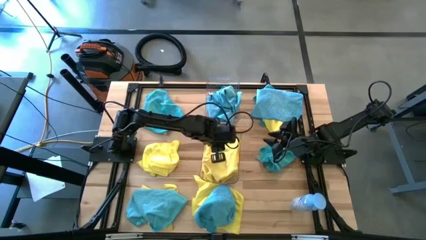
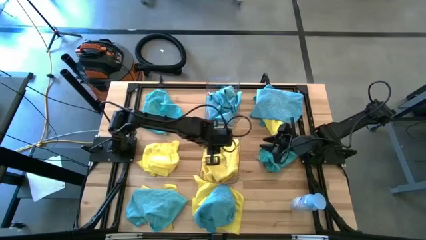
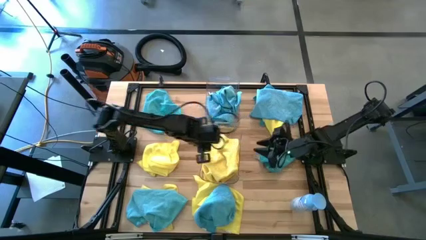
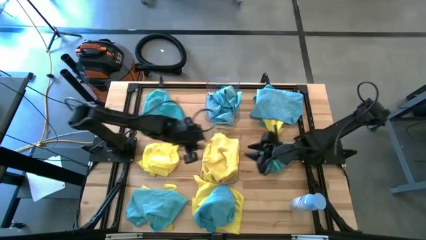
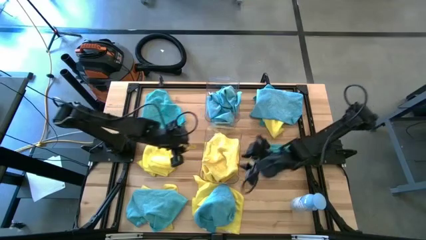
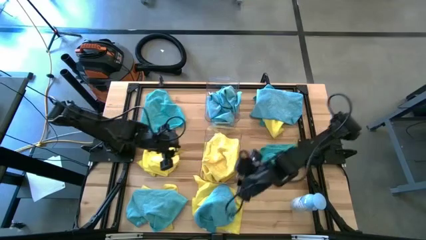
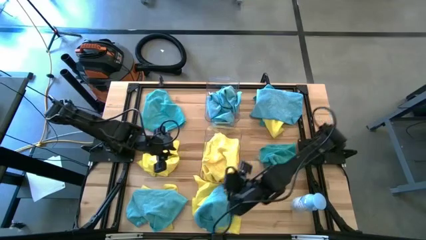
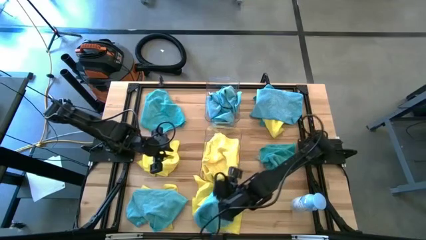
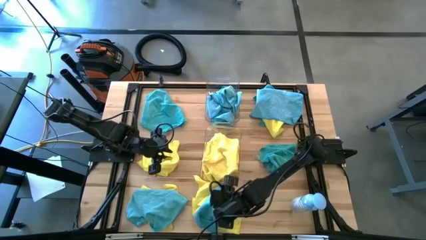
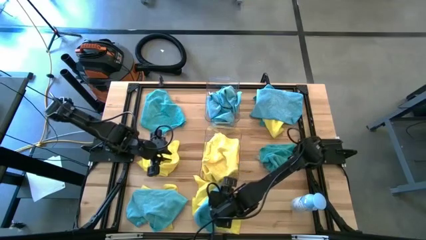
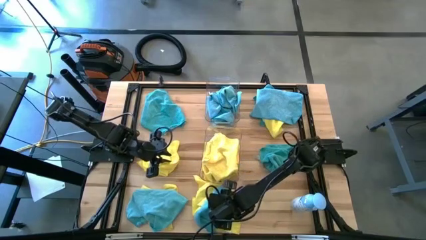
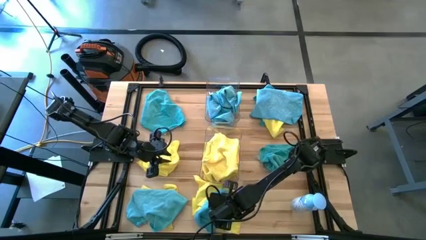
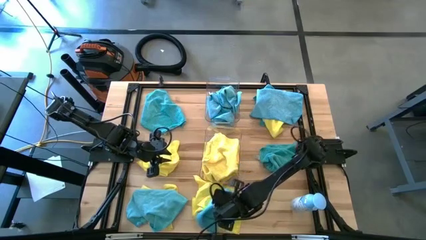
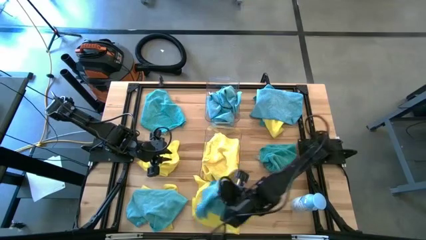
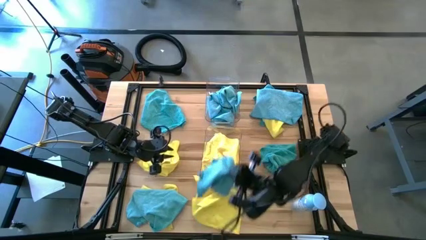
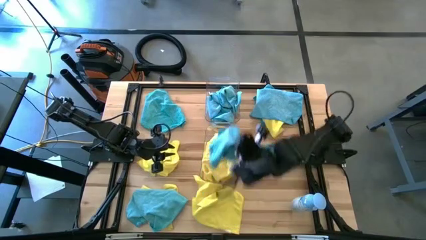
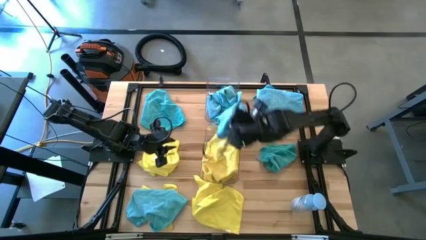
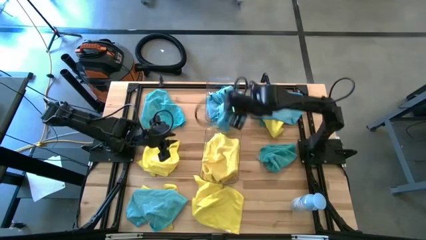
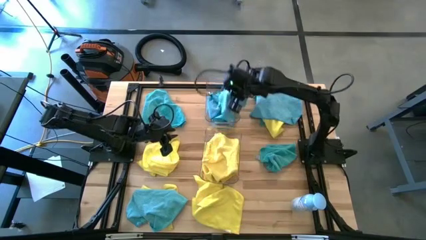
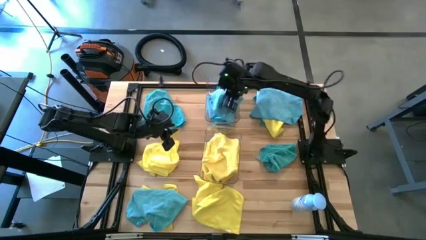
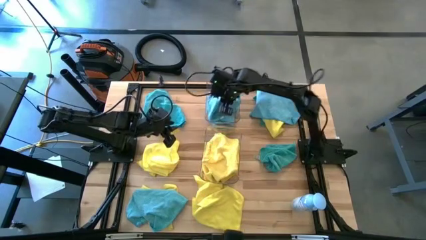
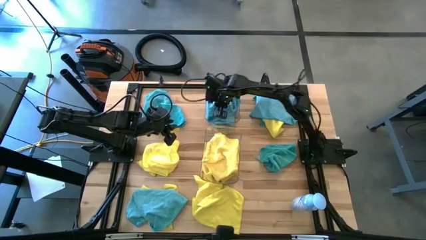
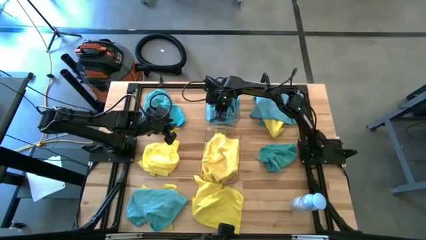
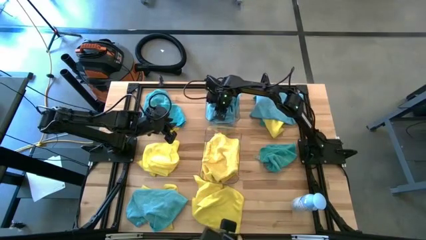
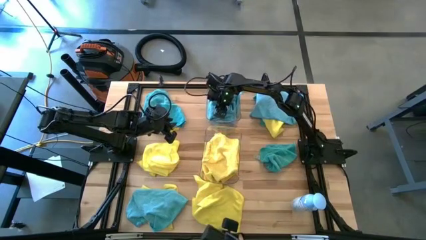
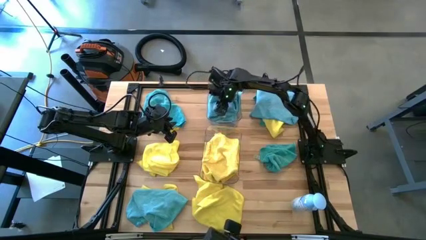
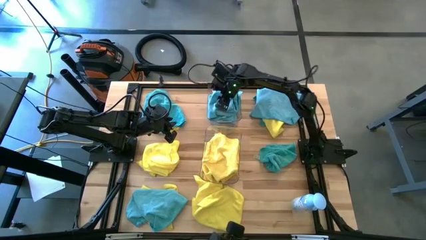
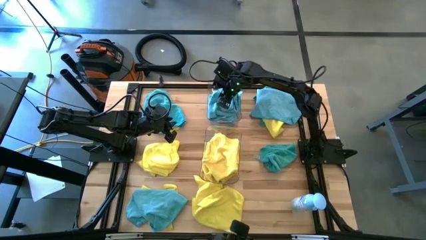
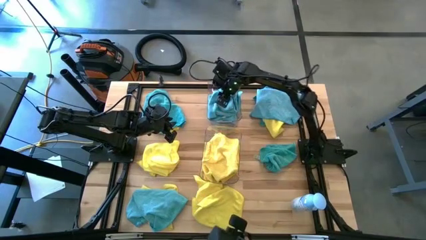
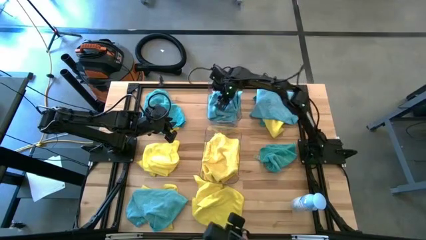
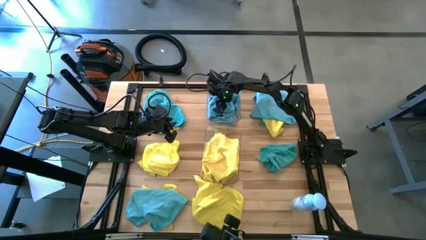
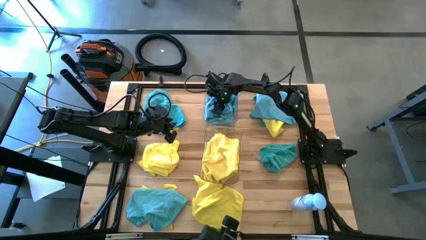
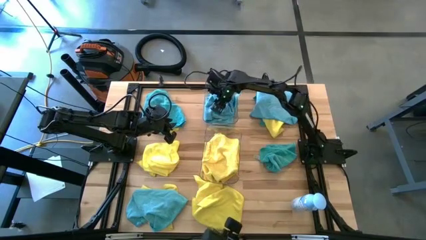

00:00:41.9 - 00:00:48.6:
Task: Sort microfiber towel by color & place in baskets
Put the blue towel into the top transparent bin

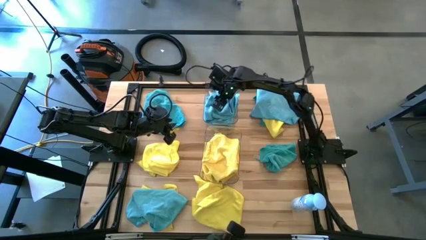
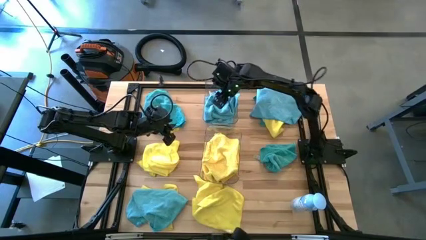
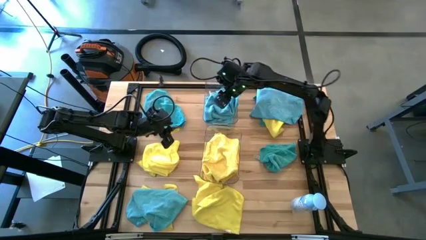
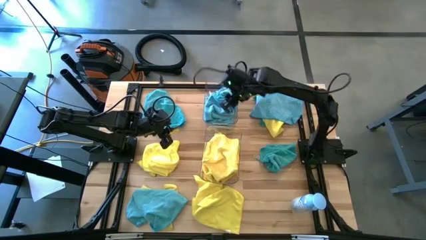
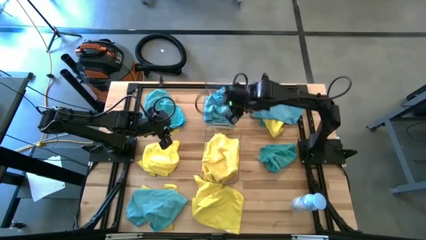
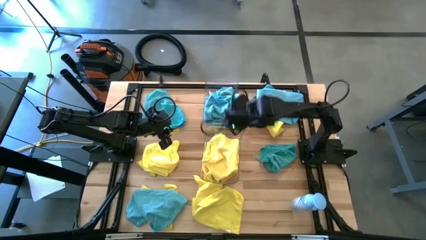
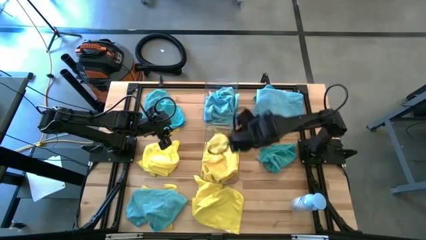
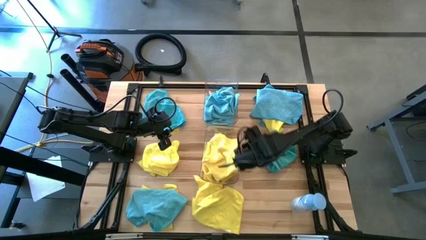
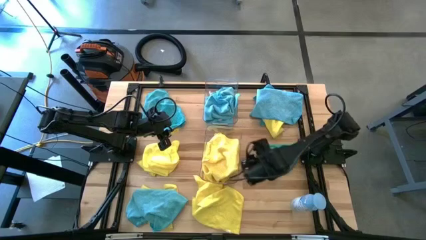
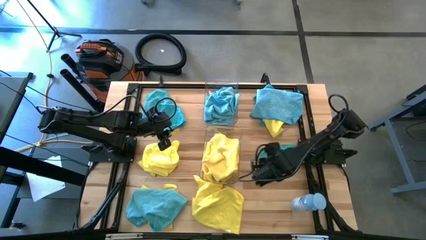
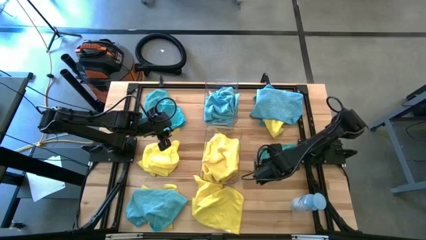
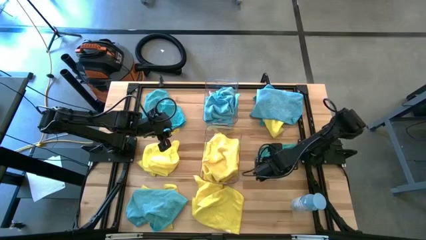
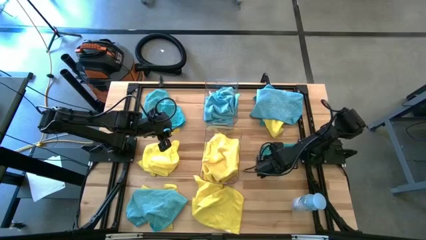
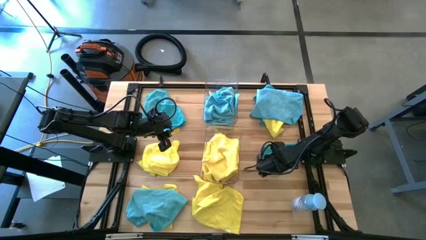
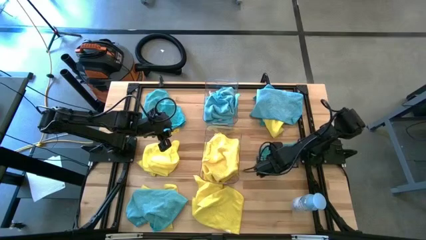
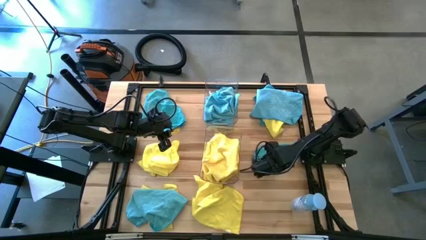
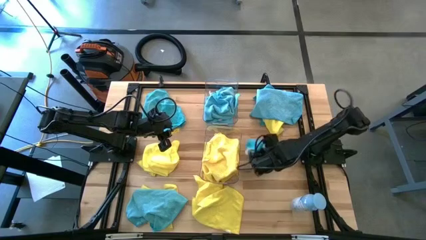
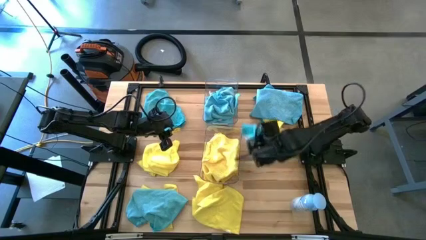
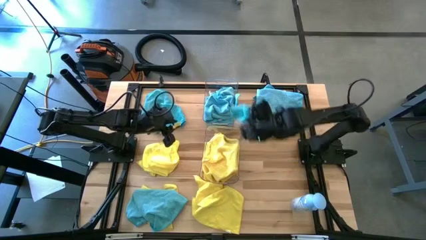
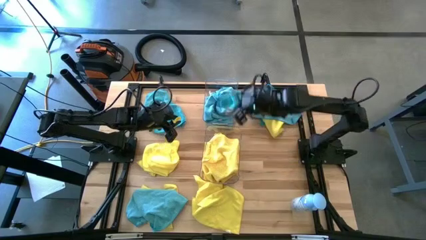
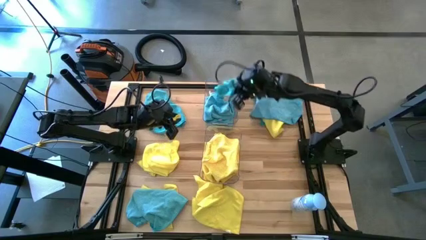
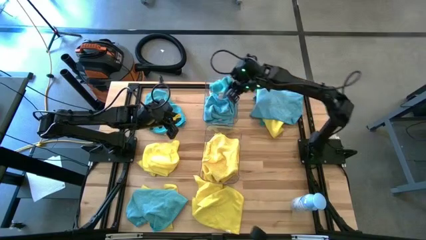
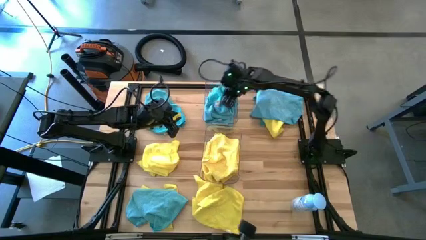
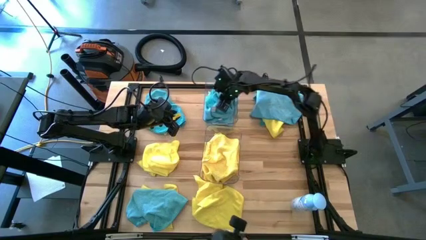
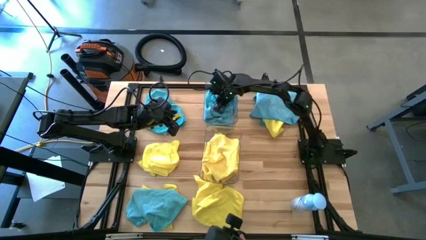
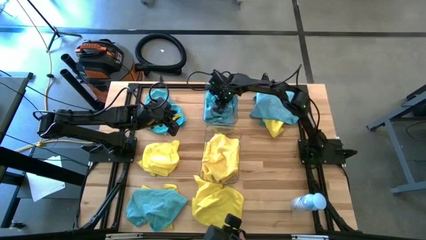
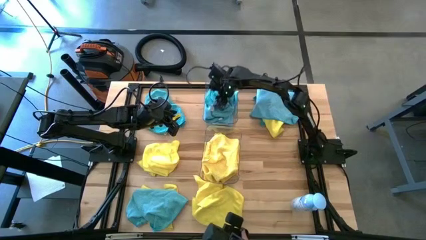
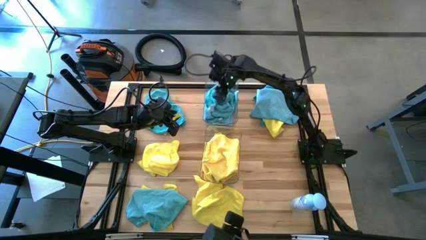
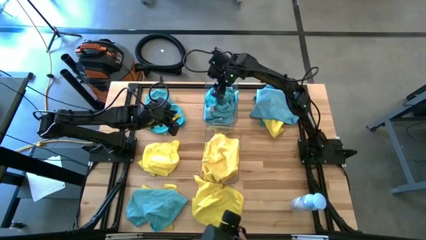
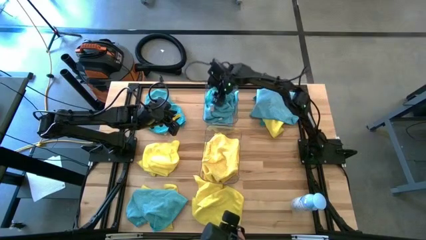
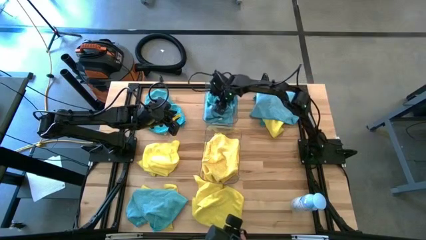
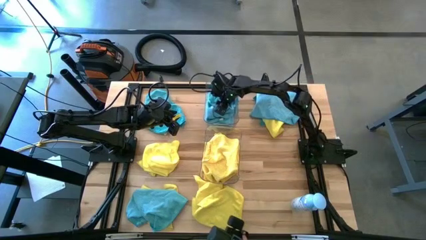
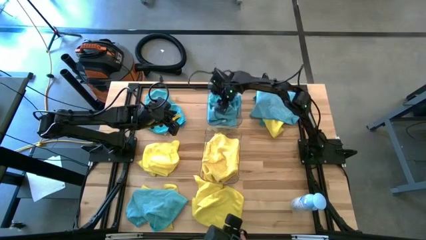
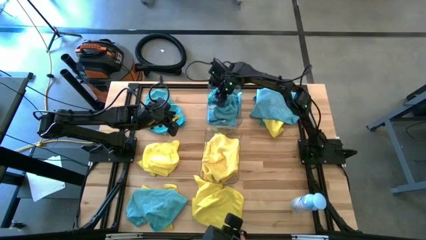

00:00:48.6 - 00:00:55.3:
Put the blue towel into the top transparent bin

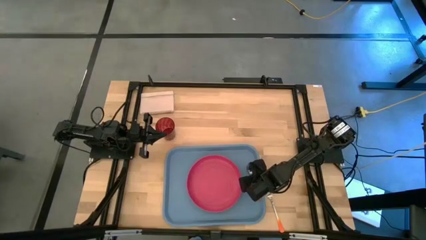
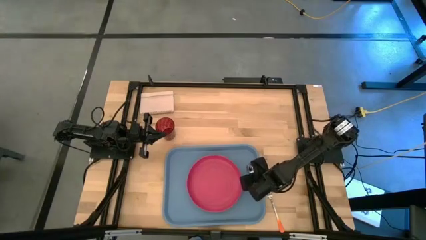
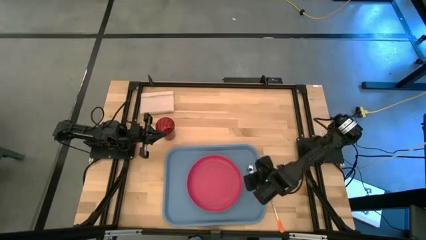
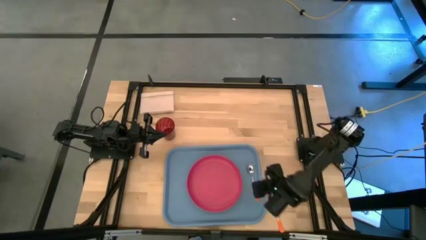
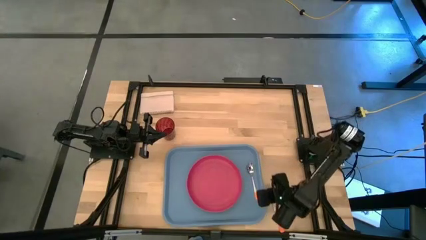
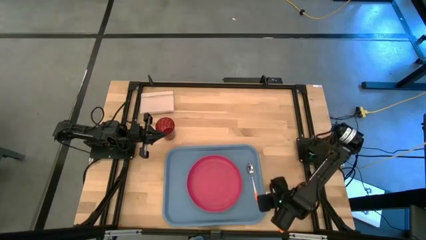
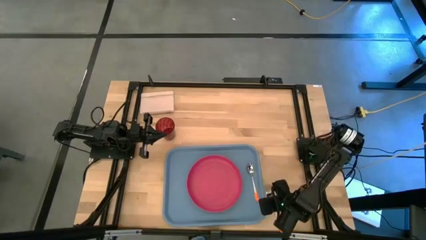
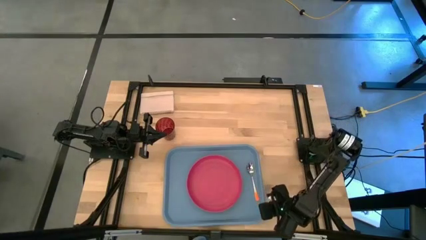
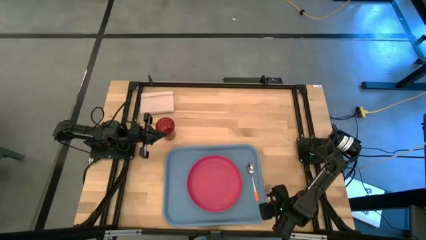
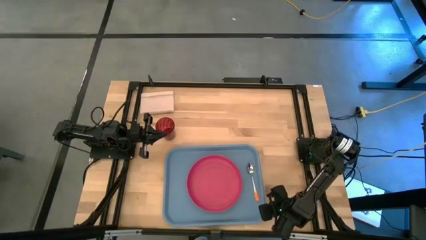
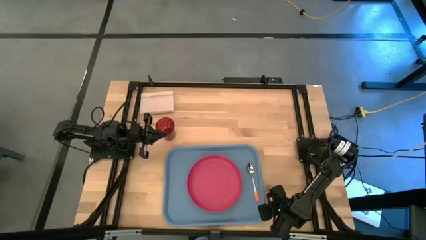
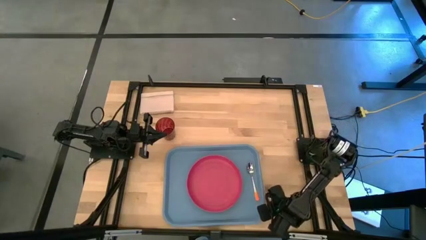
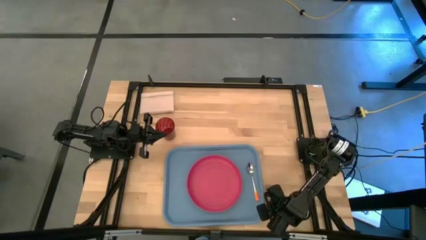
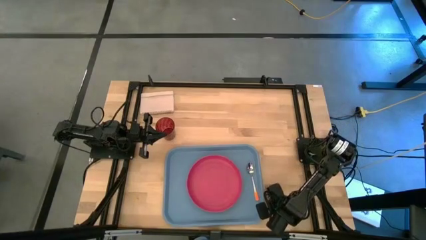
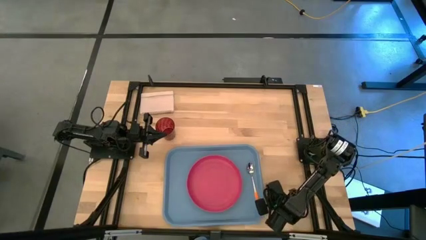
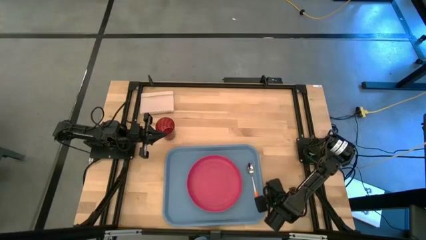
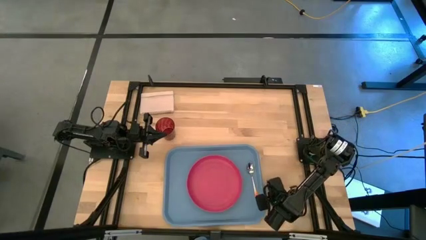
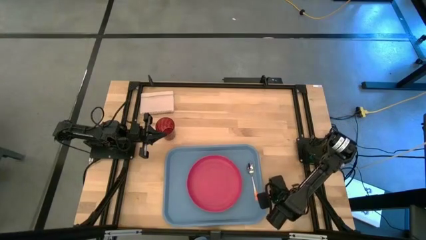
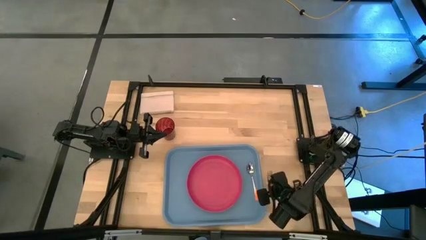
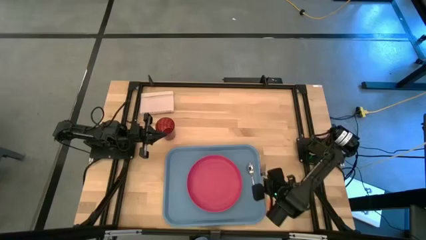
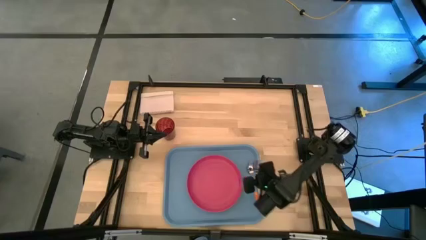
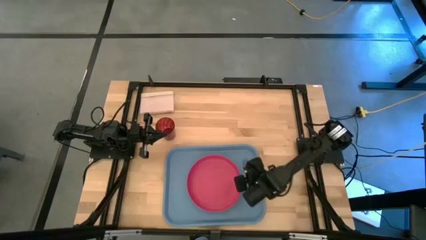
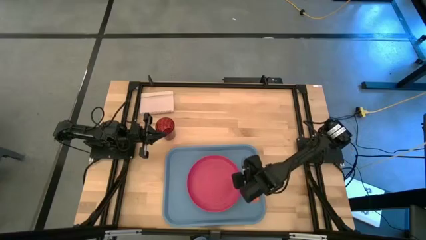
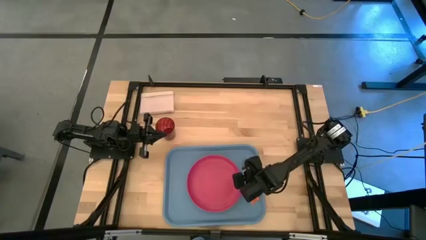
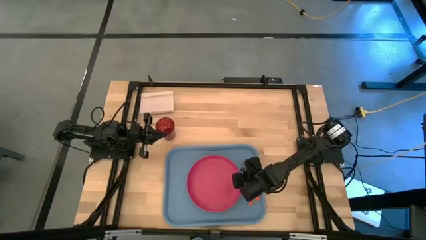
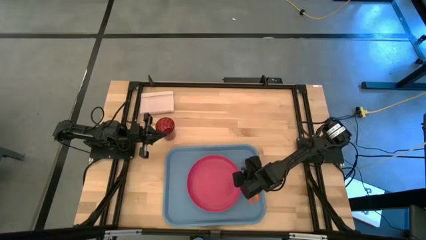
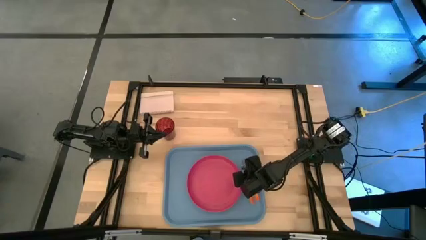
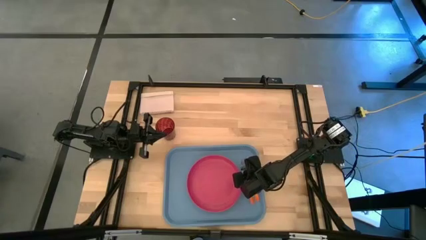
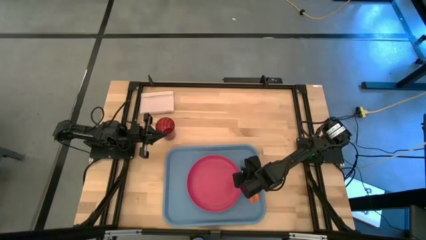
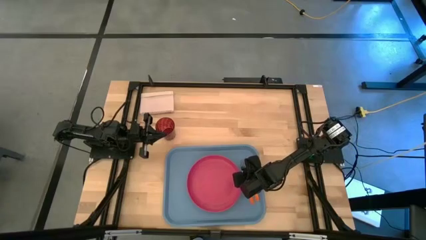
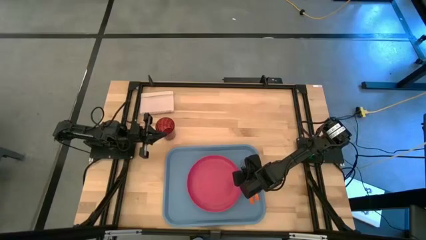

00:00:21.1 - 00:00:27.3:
Task: Pick and place plate/cup/fork/spoon on tray
Put the orange fork on the blue tray to the right of the red plate
